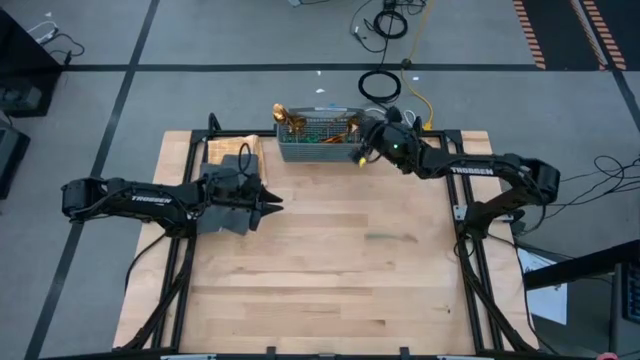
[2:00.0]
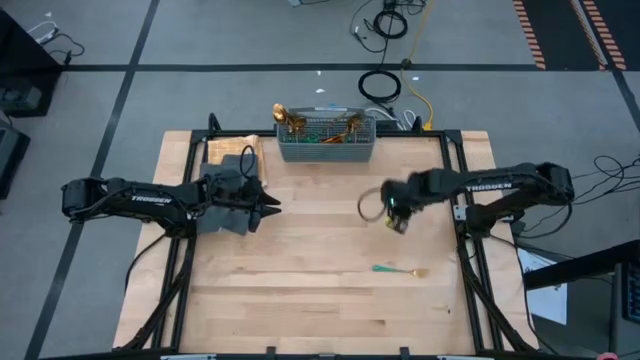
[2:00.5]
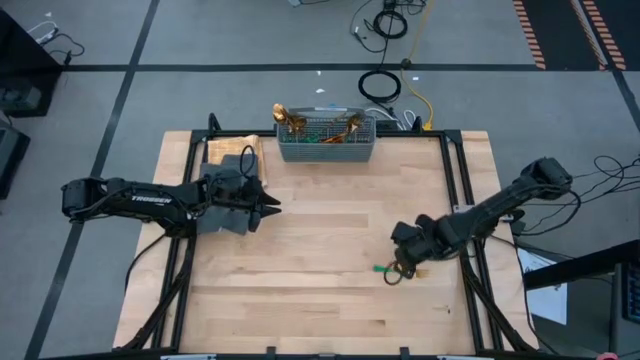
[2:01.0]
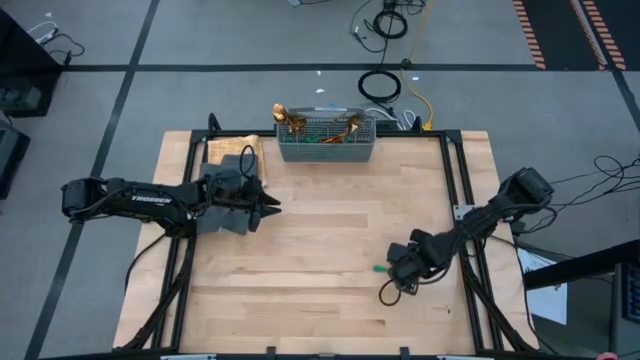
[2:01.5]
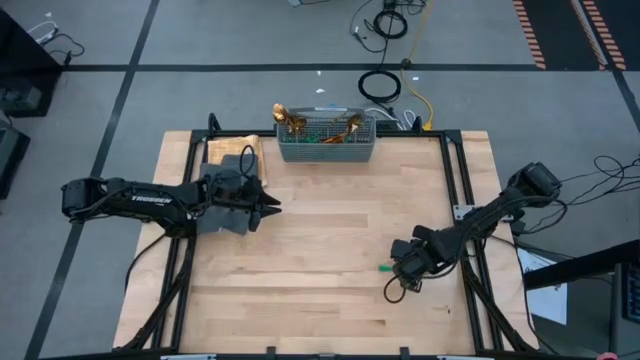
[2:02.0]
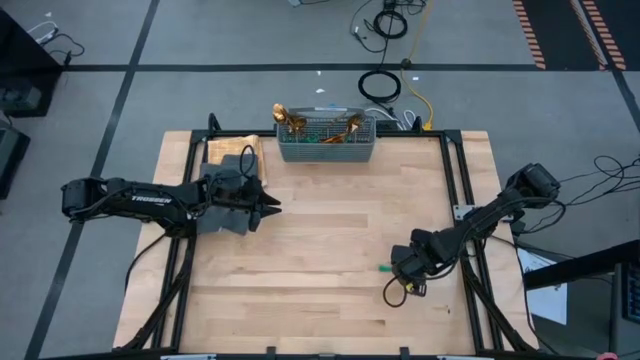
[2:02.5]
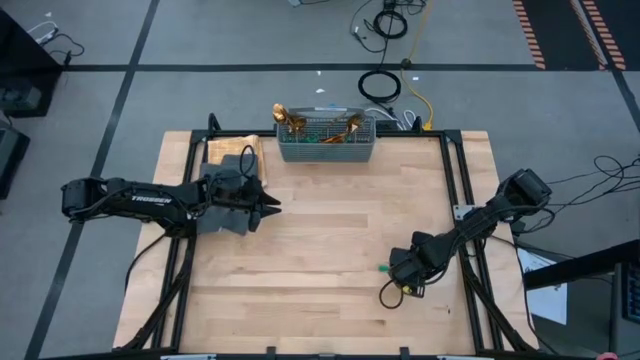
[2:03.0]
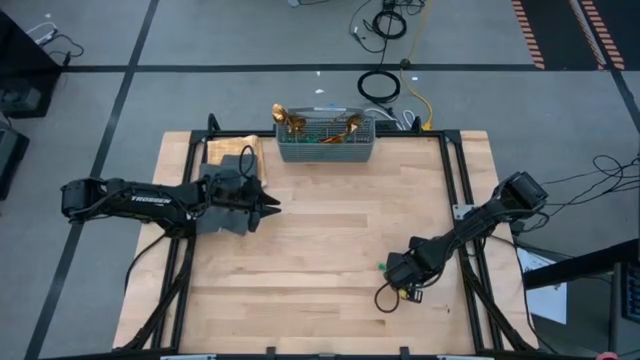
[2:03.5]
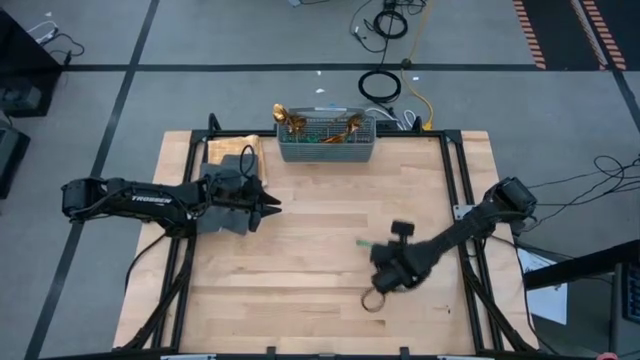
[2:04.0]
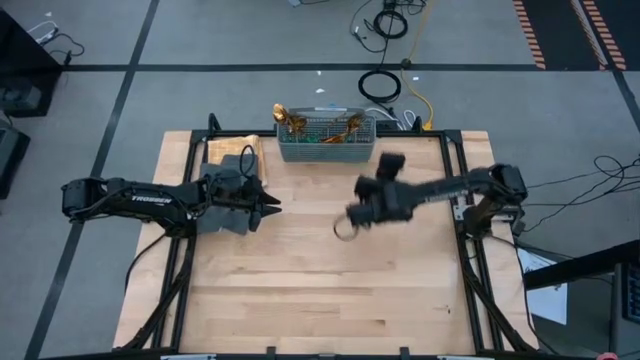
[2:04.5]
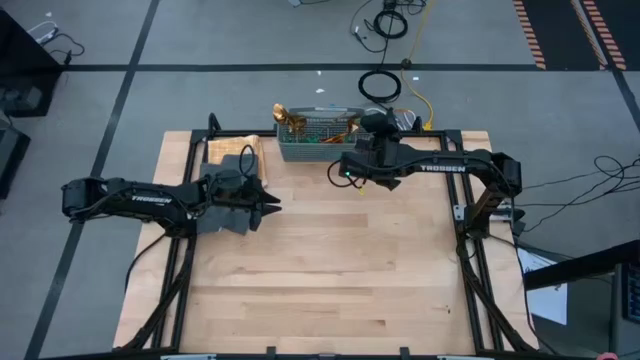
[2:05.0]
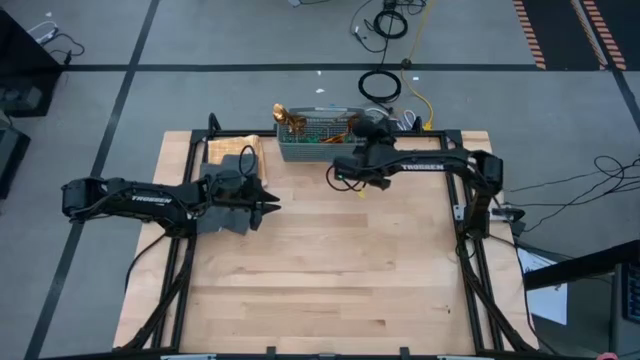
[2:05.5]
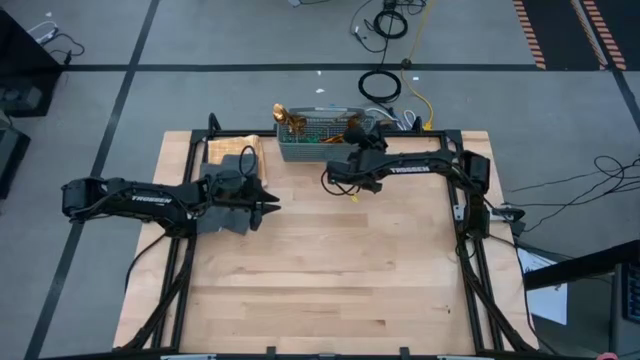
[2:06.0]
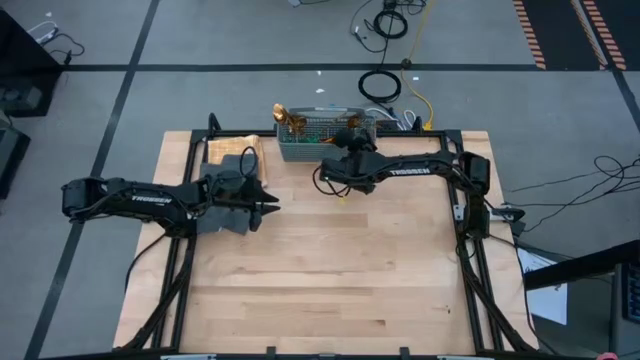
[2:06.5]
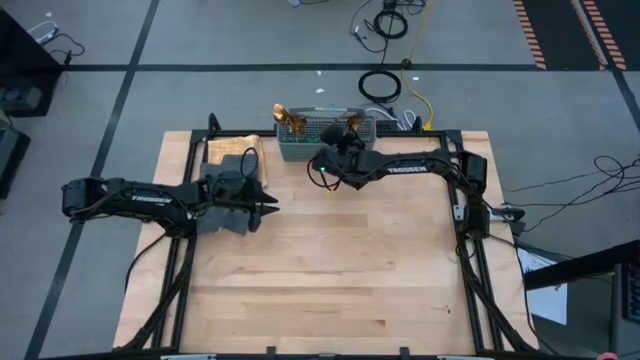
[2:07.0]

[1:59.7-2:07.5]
Task: Sort silverware
Put the green fork into the silverware basket

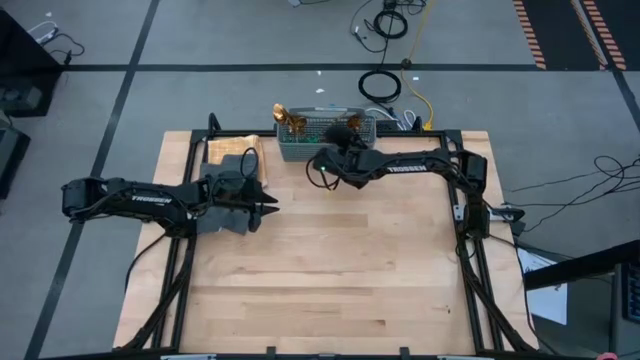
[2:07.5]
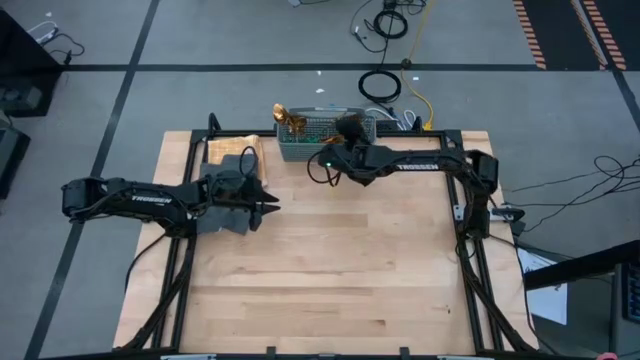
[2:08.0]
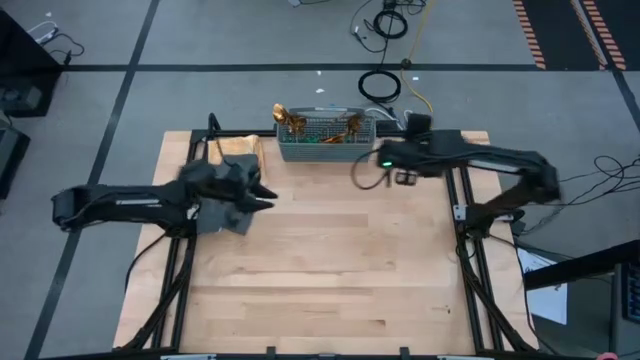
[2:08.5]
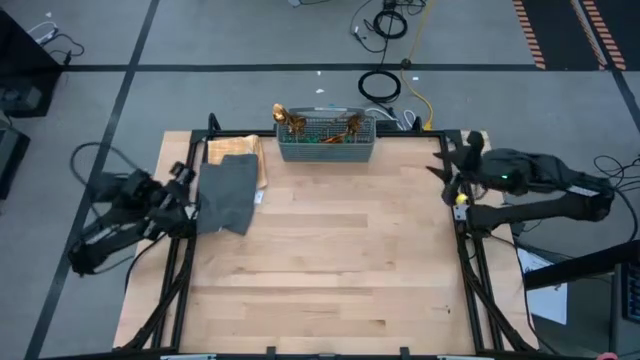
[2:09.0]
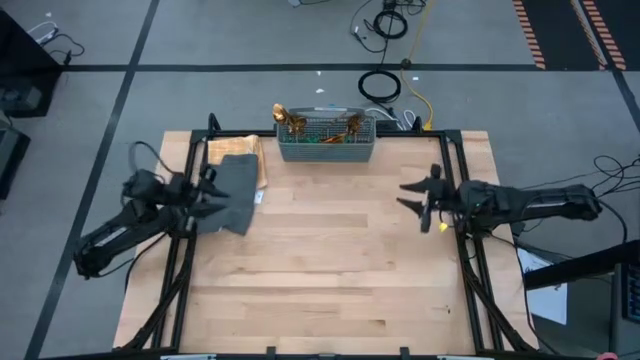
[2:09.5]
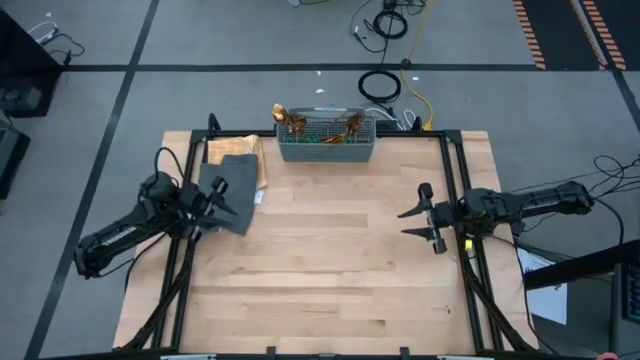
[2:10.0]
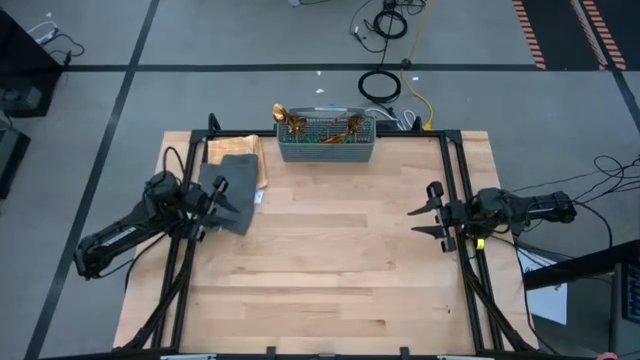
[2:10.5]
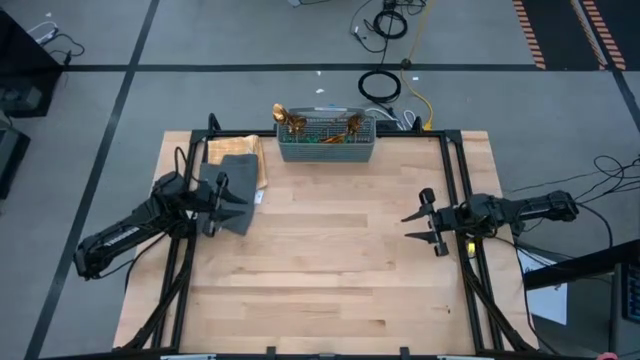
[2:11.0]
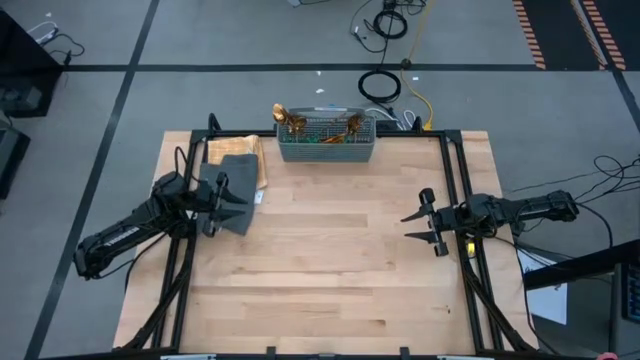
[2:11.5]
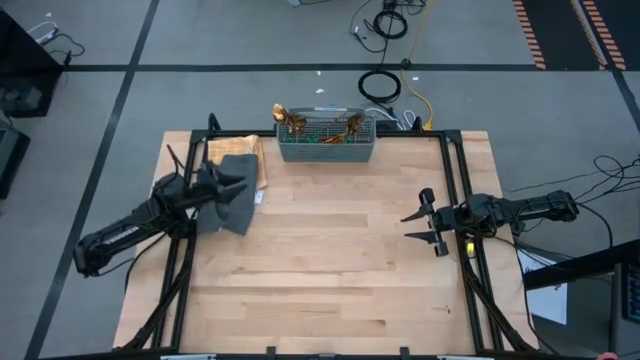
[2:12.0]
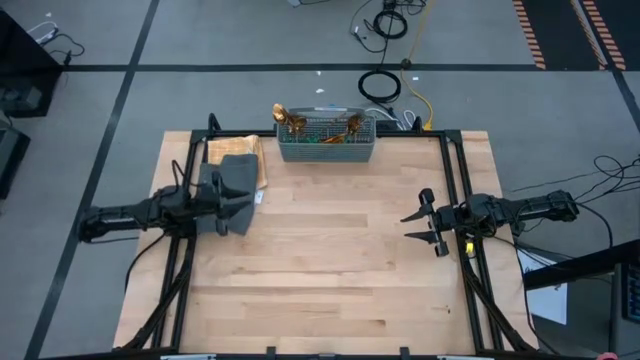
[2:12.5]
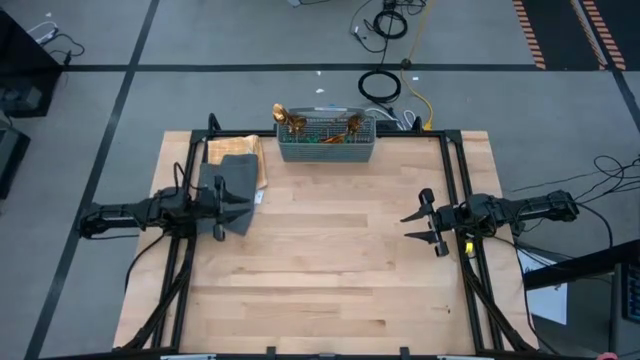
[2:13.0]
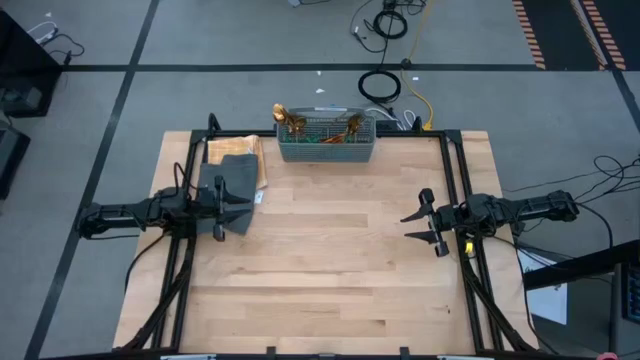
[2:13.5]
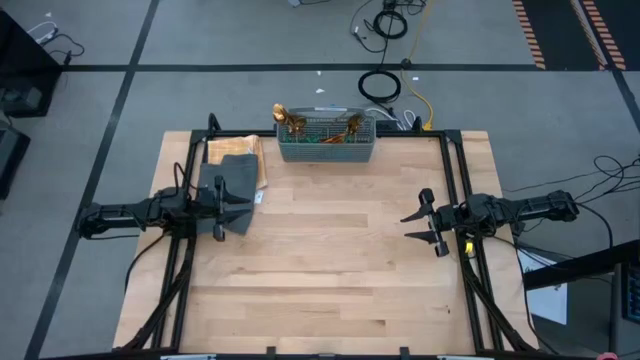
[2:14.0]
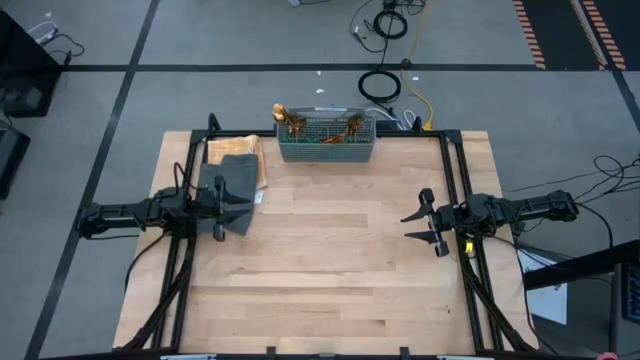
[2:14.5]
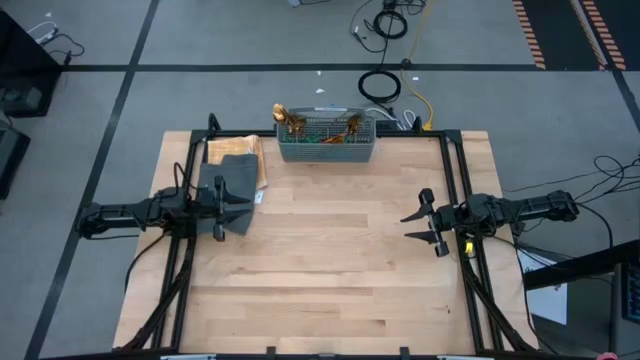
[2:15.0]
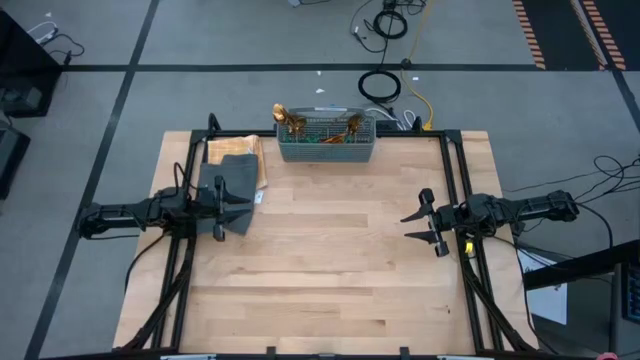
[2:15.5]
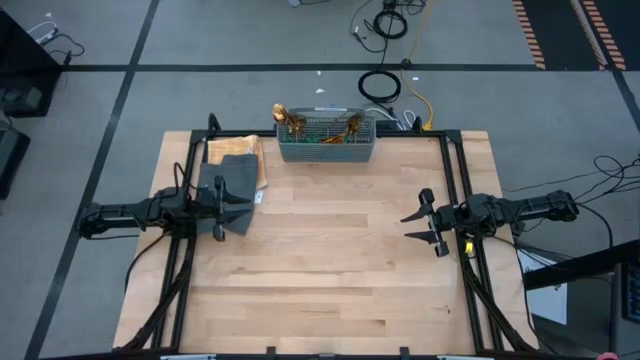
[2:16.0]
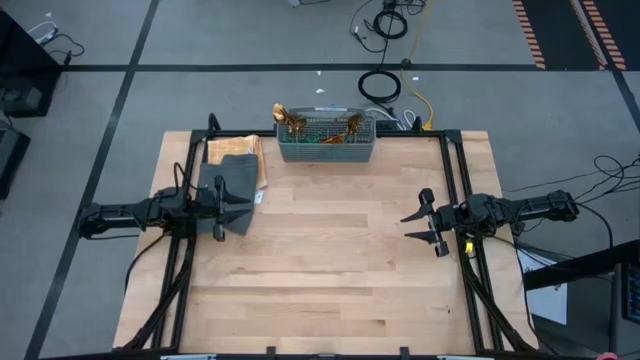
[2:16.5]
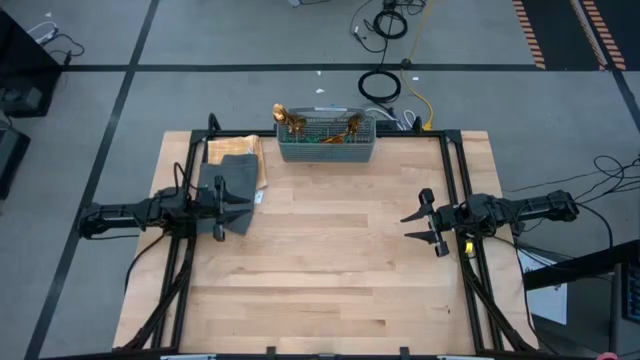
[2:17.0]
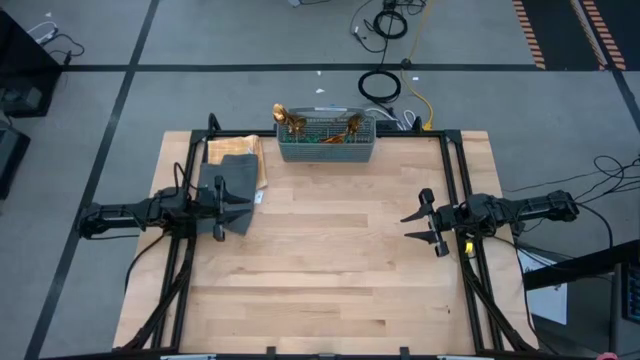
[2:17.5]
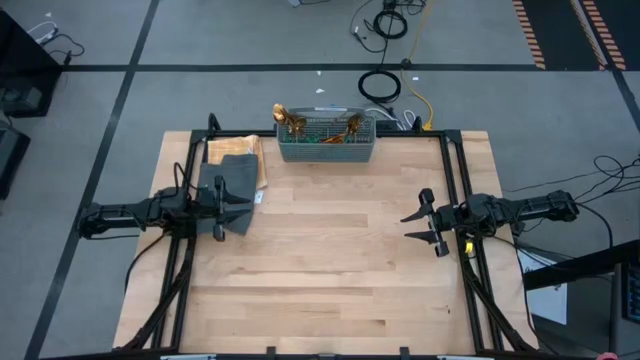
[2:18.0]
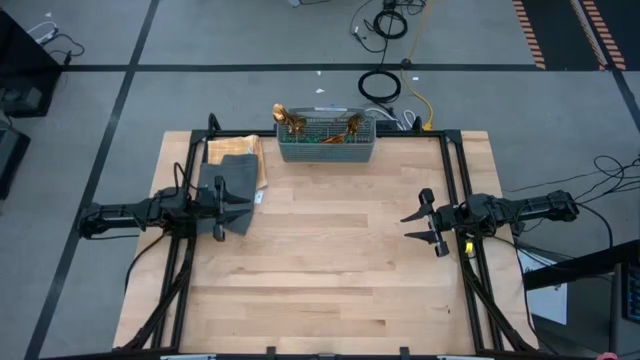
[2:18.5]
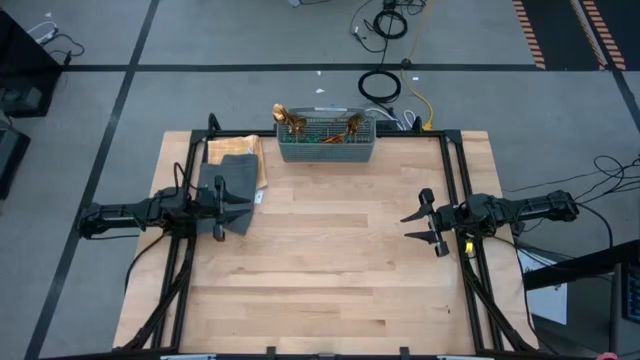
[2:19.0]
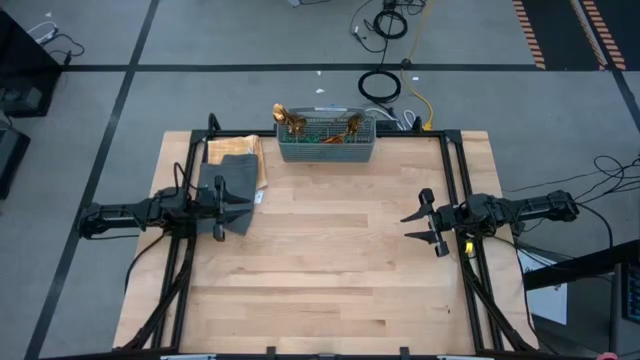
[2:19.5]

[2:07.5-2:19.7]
Return to Home Position

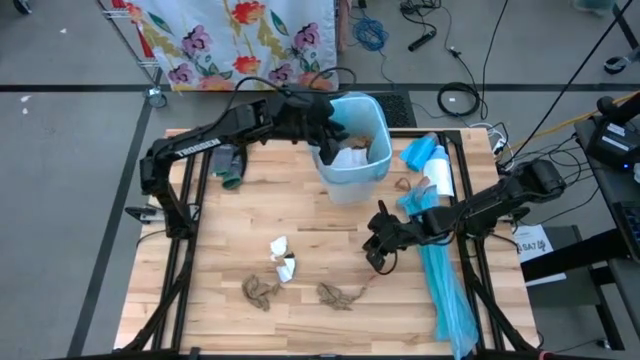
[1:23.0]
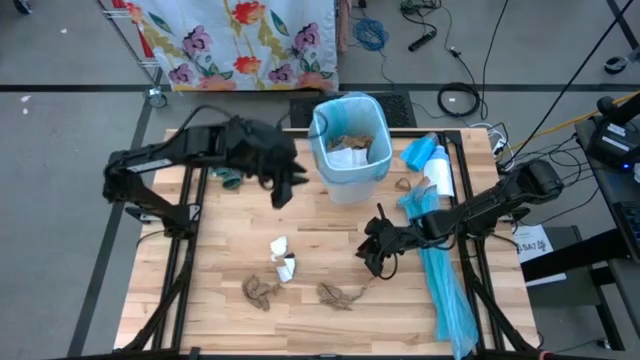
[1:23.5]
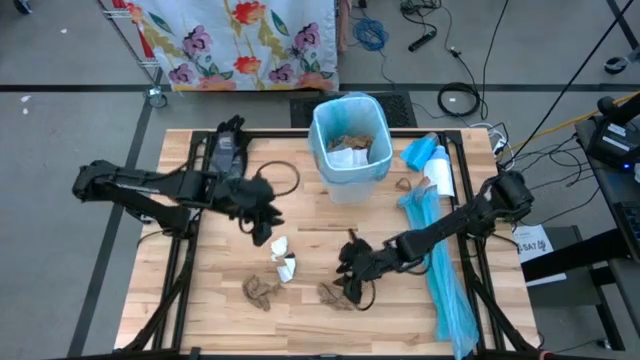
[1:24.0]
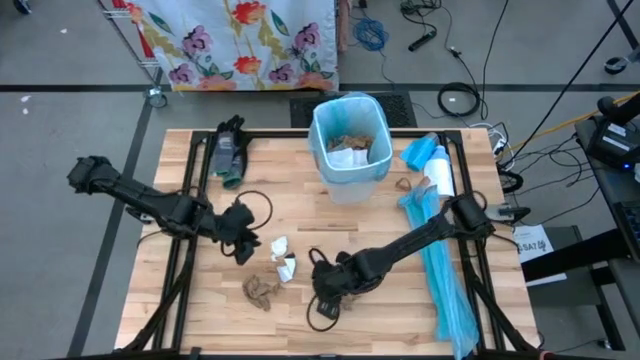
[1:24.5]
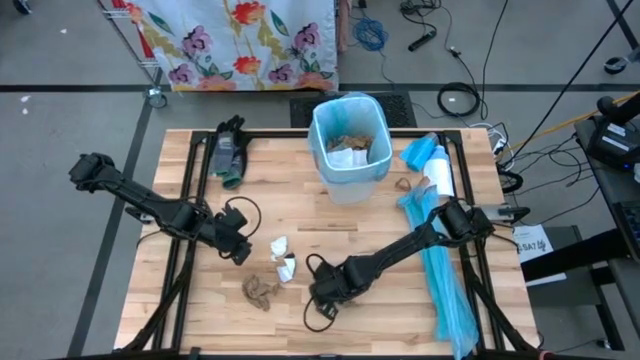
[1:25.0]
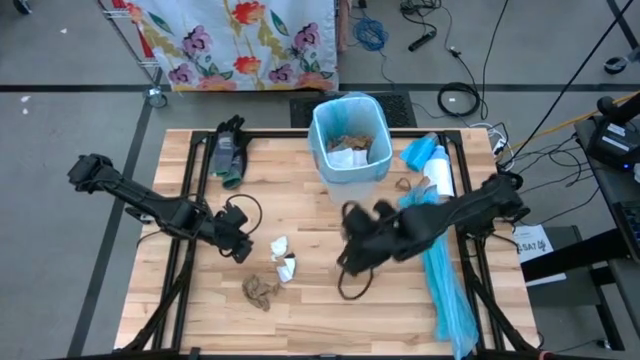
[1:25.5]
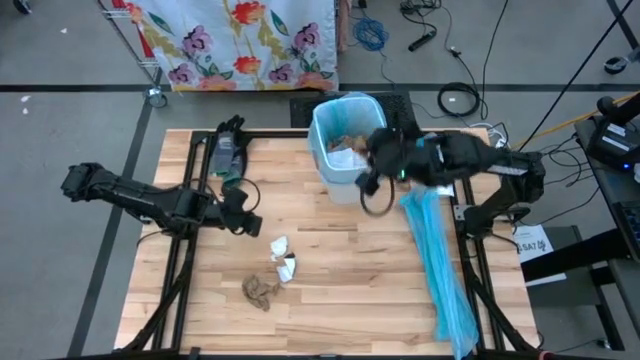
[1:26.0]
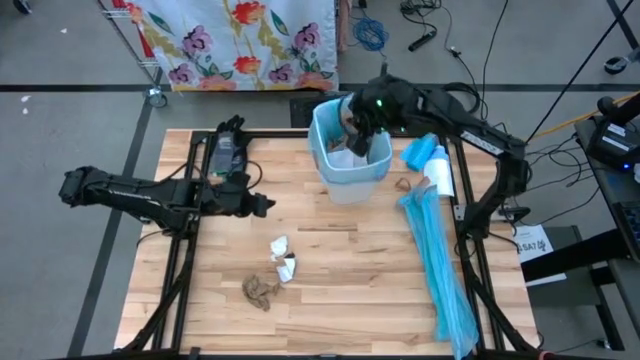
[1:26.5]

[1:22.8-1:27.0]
Task: place trash/remove bag and relplace
Put the brown napkin into the trash bin
